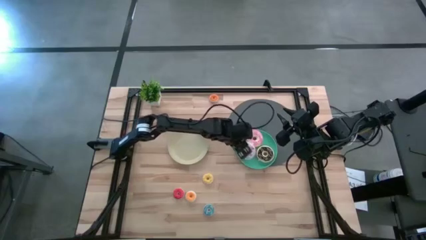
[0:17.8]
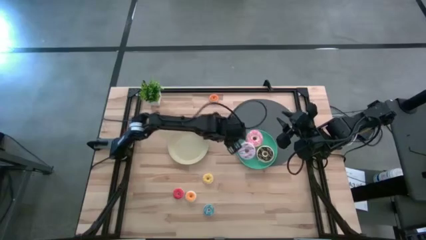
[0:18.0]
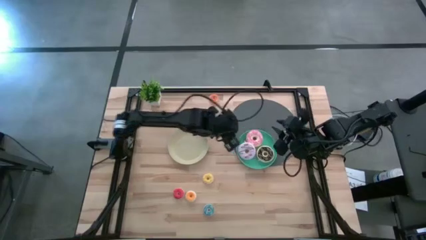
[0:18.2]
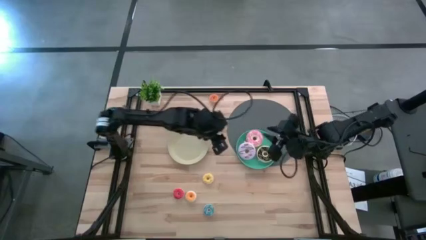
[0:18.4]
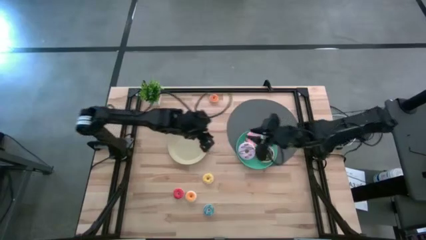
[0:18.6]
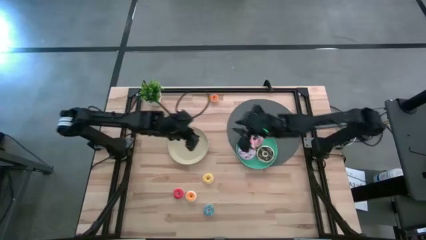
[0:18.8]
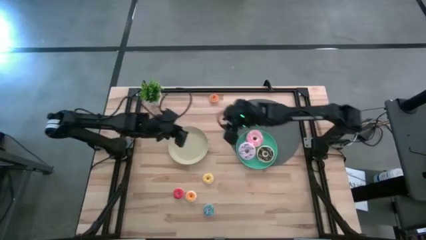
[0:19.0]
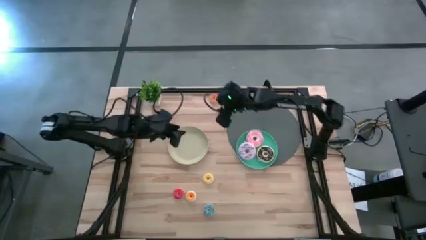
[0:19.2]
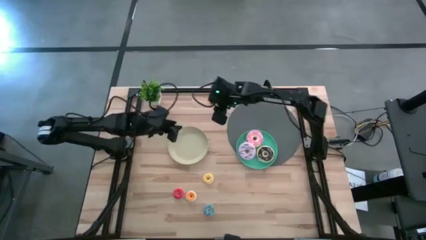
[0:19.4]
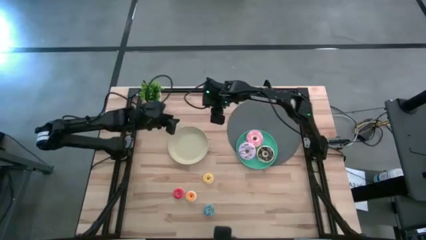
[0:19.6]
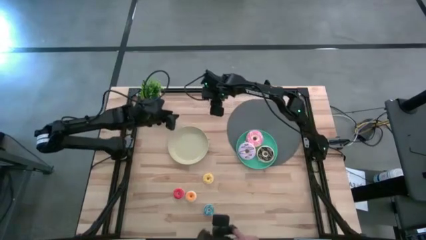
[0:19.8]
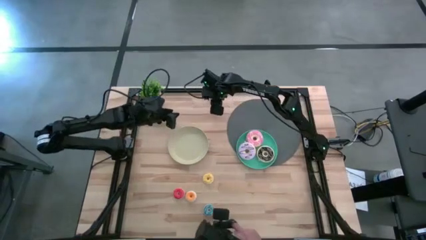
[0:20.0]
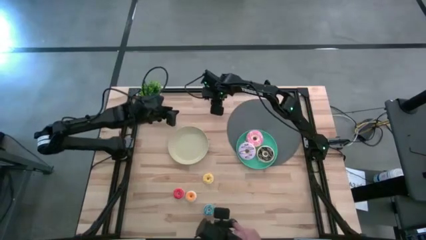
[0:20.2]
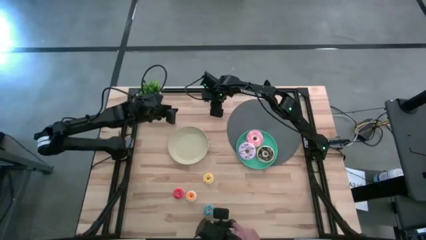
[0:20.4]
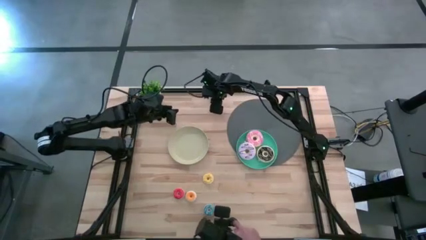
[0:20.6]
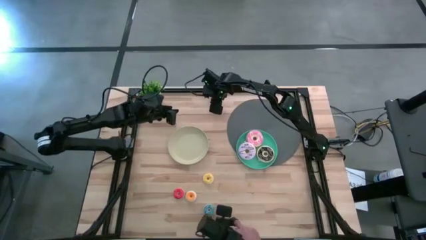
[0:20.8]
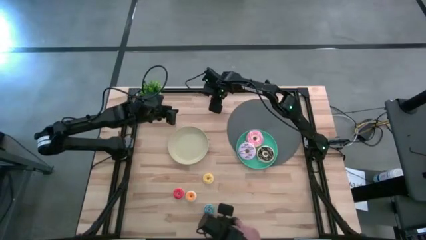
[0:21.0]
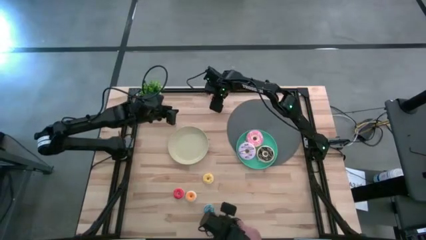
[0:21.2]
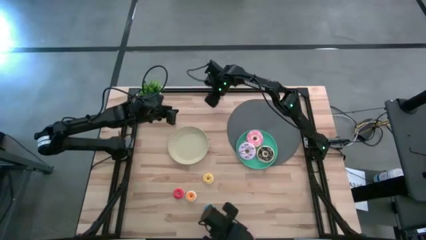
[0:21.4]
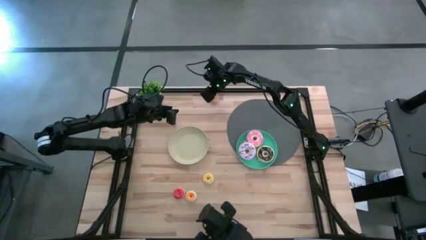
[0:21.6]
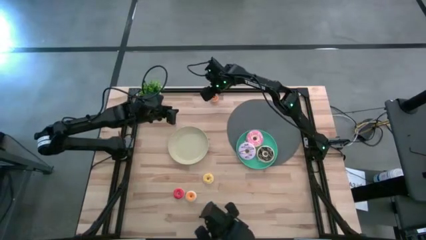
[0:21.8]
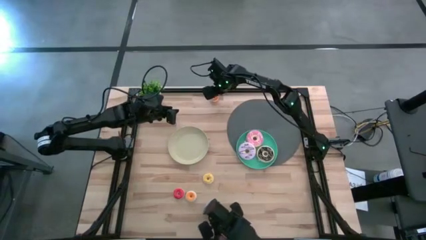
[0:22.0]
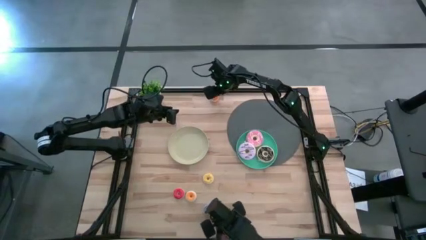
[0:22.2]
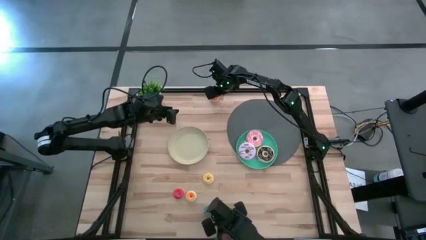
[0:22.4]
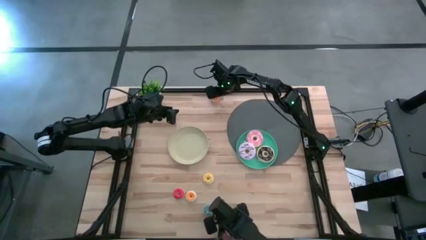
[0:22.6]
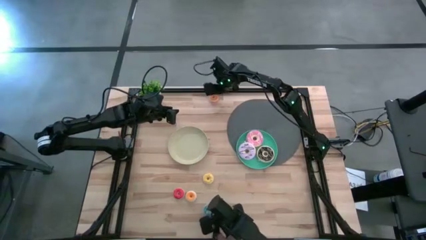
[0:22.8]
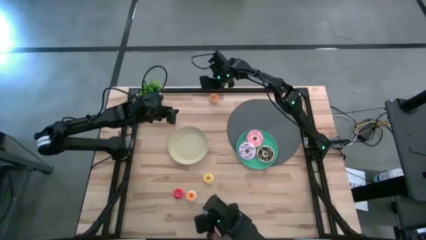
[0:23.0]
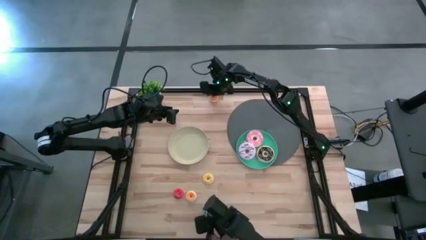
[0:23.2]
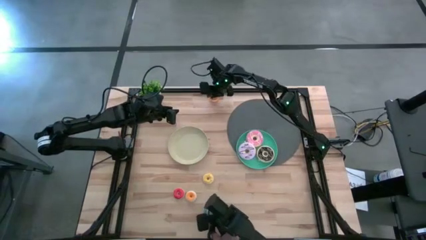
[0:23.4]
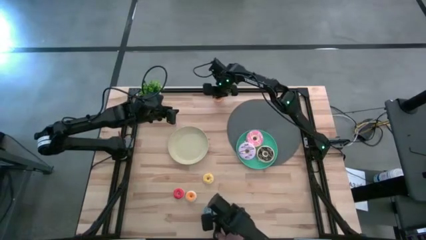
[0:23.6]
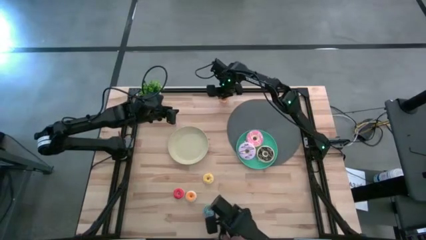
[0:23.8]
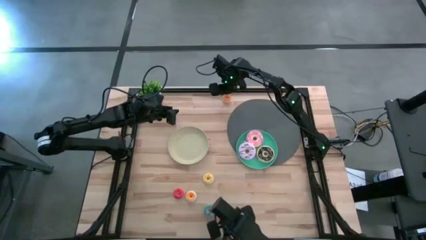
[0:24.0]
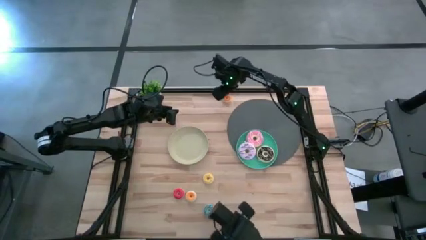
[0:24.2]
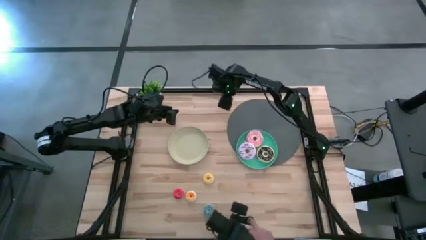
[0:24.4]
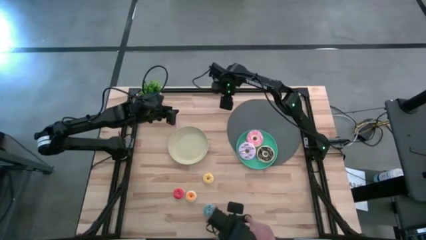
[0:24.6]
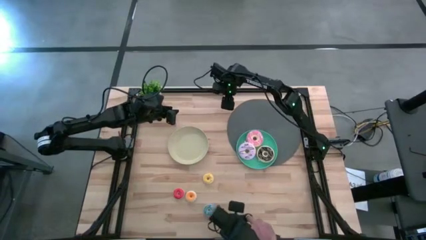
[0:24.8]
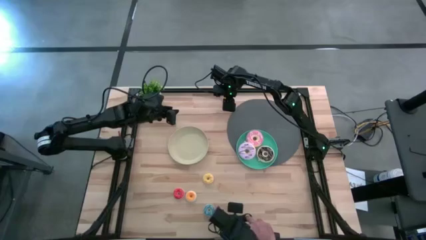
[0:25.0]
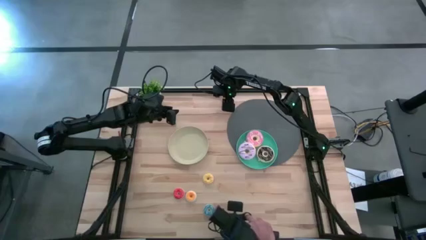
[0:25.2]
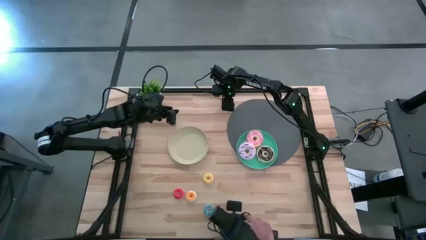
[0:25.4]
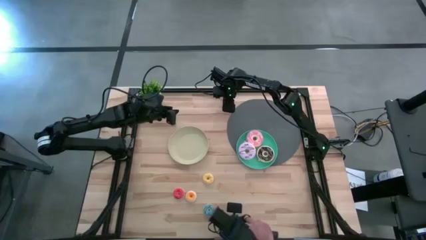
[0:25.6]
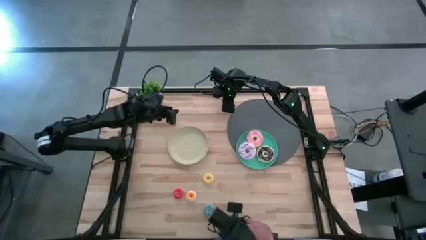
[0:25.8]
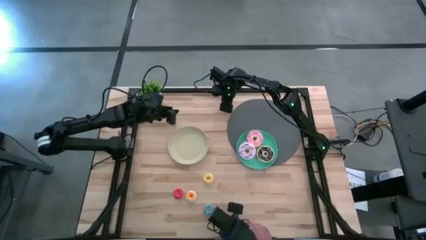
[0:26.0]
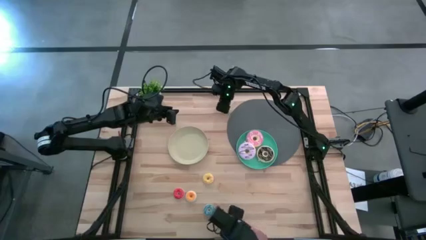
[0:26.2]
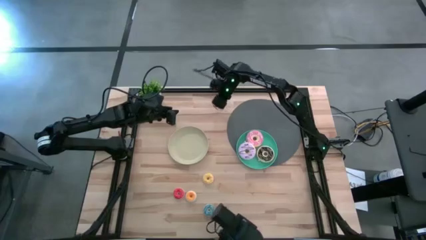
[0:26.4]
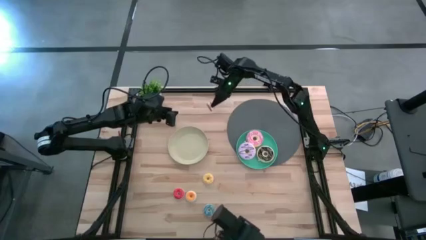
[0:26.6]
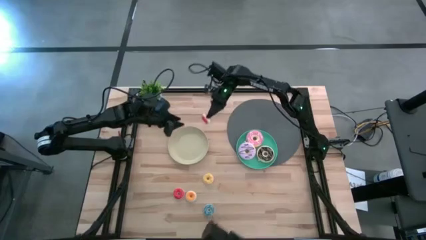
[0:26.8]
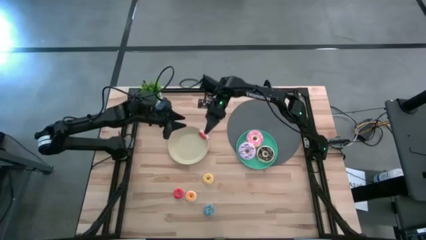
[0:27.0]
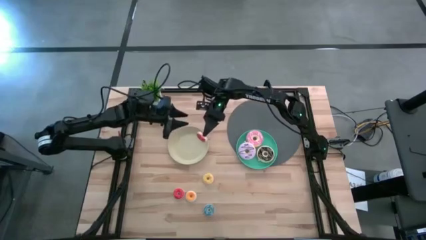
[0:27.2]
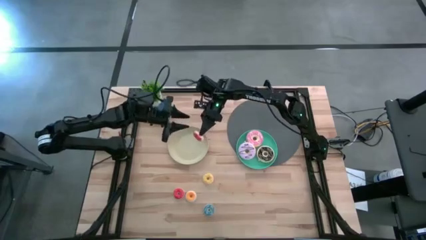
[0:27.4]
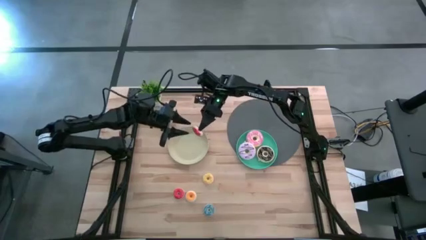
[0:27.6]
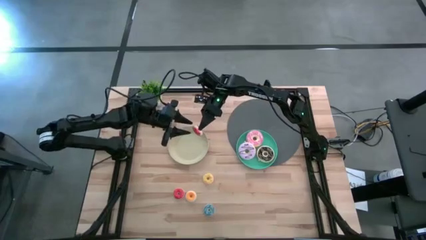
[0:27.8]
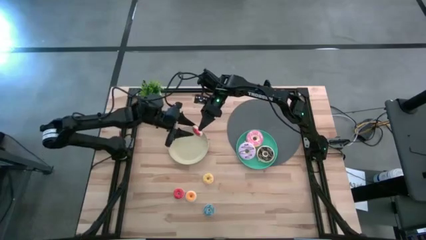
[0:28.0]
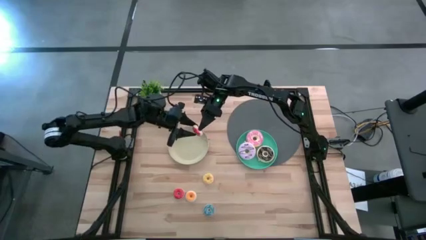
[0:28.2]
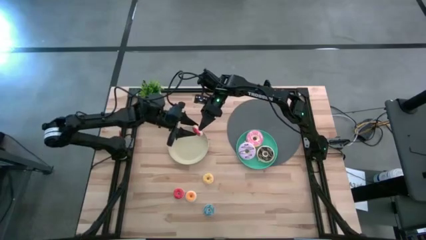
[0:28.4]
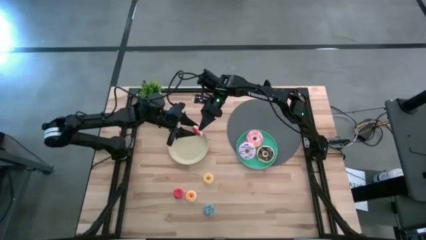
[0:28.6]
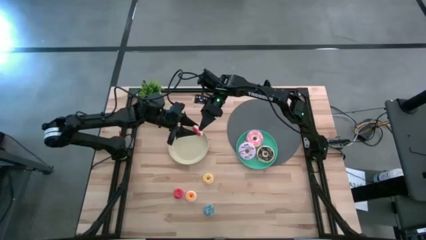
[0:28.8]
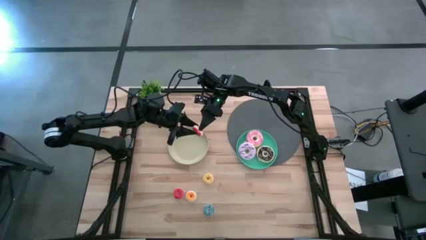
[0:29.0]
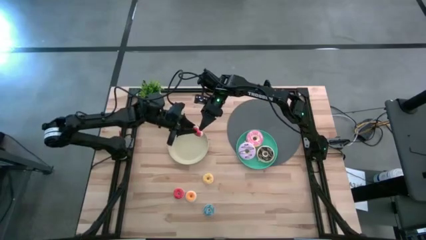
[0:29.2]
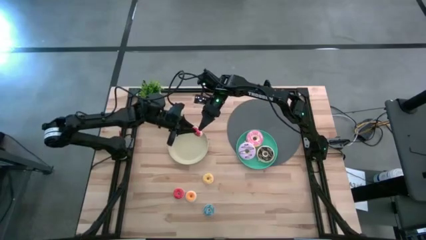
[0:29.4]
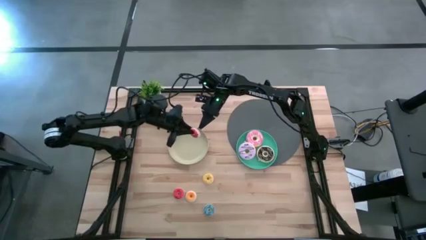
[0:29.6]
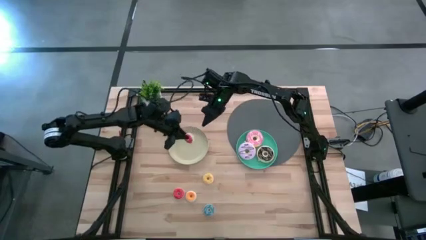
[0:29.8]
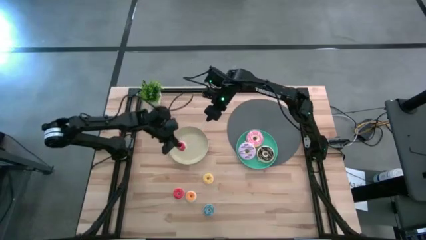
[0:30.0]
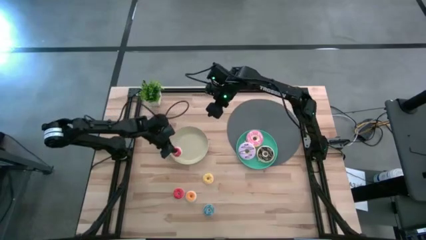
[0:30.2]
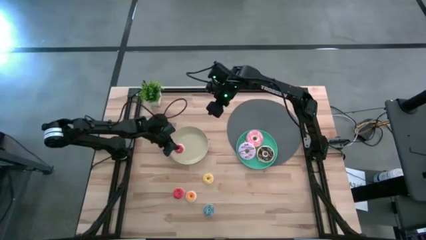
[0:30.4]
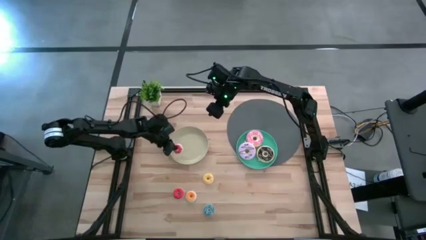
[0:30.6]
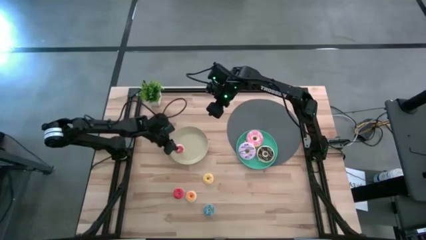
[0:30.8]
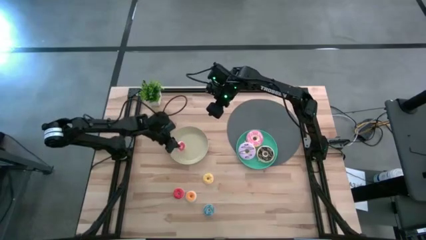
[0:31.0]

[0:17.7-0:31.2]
Task: Pick & Place donuts
Put the top small orange donut on the brown plate
